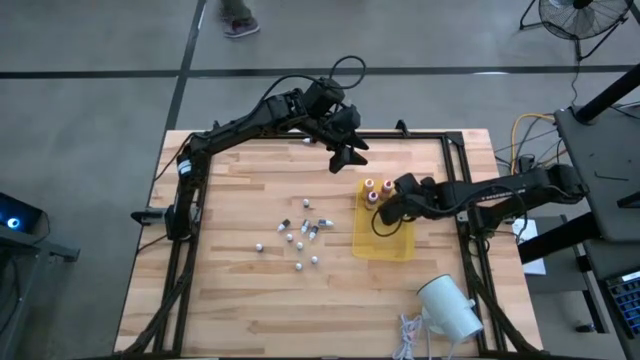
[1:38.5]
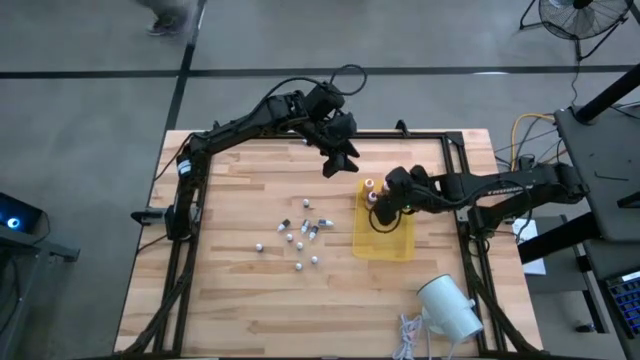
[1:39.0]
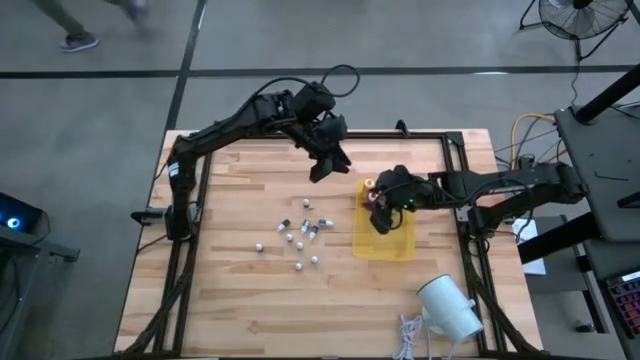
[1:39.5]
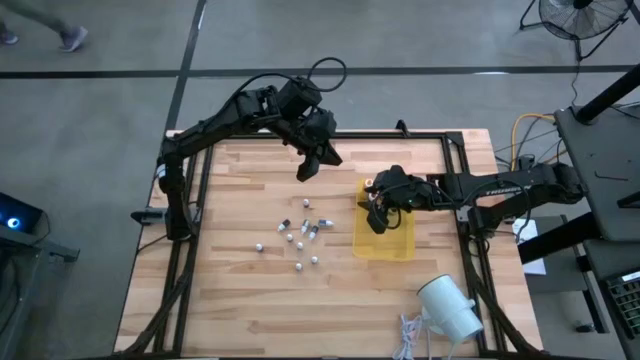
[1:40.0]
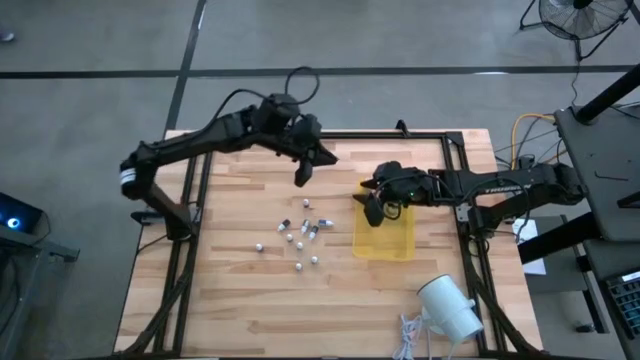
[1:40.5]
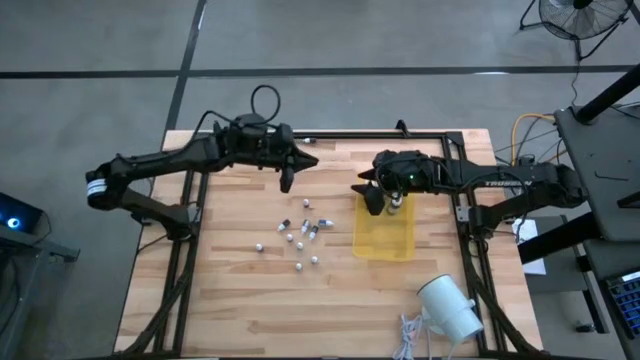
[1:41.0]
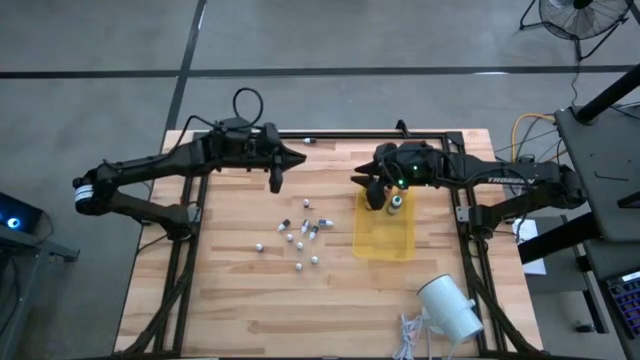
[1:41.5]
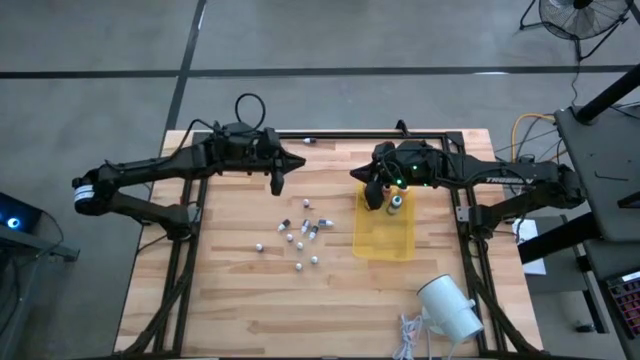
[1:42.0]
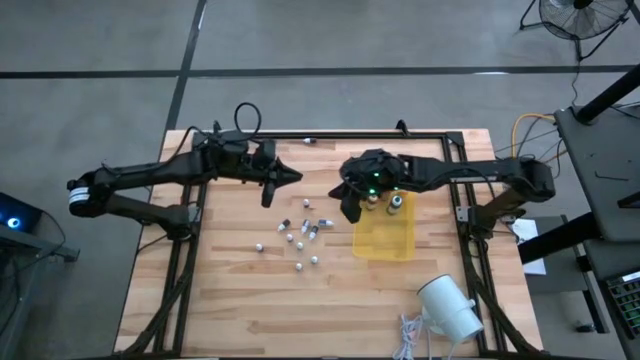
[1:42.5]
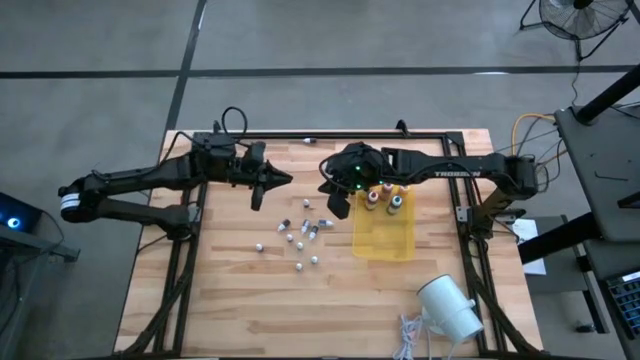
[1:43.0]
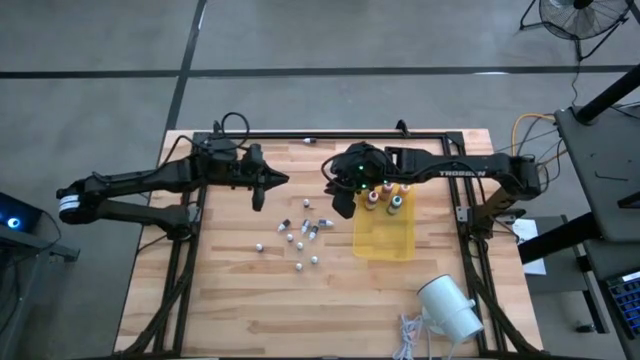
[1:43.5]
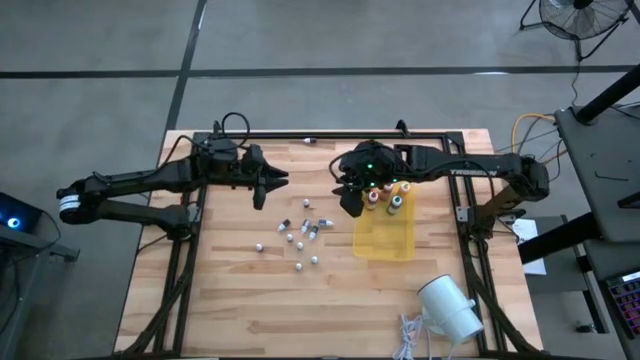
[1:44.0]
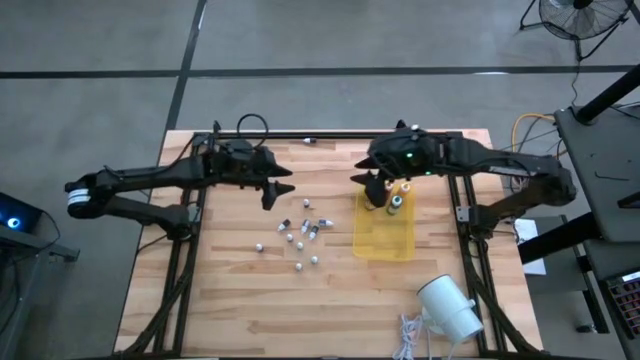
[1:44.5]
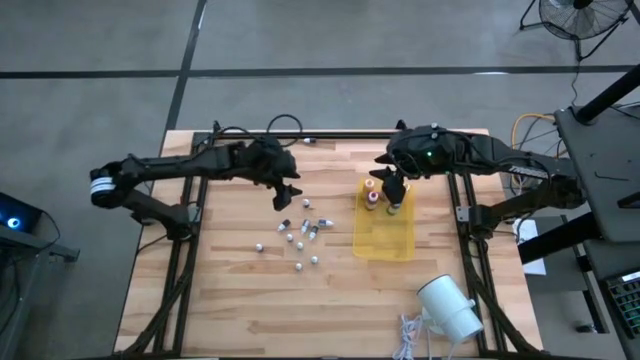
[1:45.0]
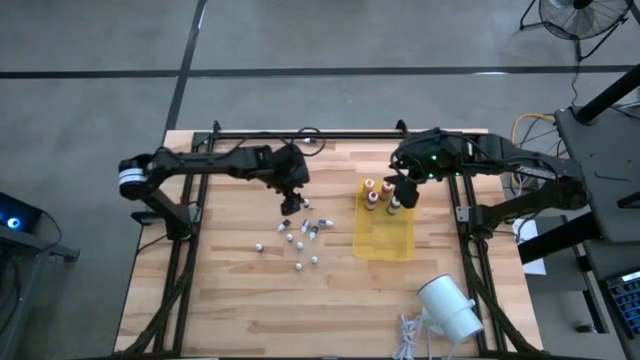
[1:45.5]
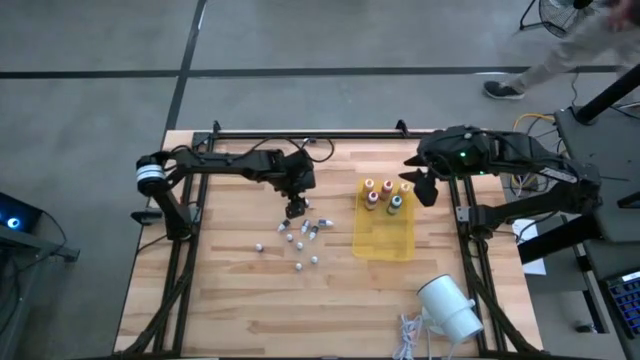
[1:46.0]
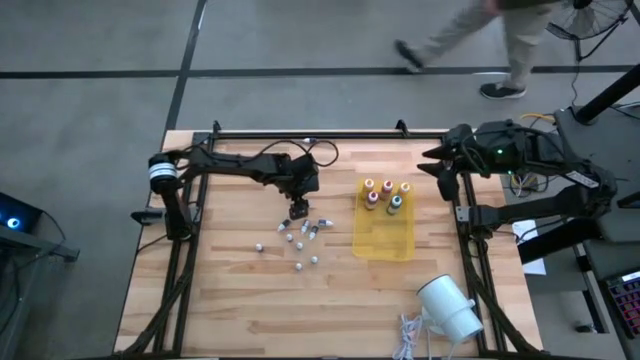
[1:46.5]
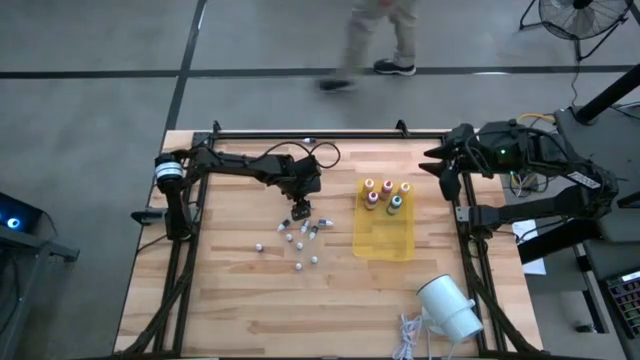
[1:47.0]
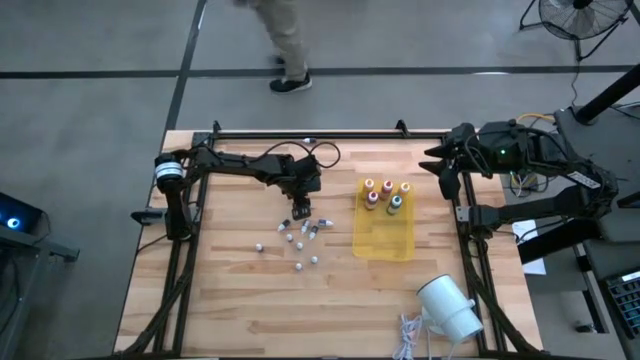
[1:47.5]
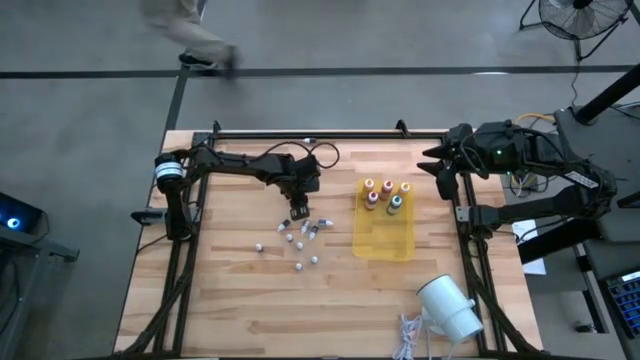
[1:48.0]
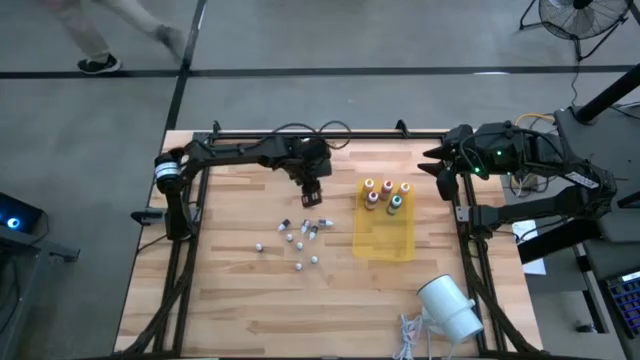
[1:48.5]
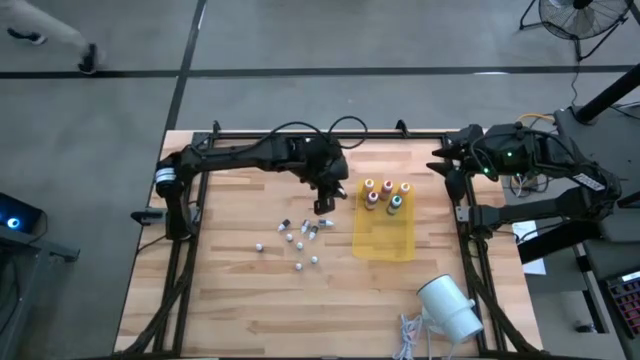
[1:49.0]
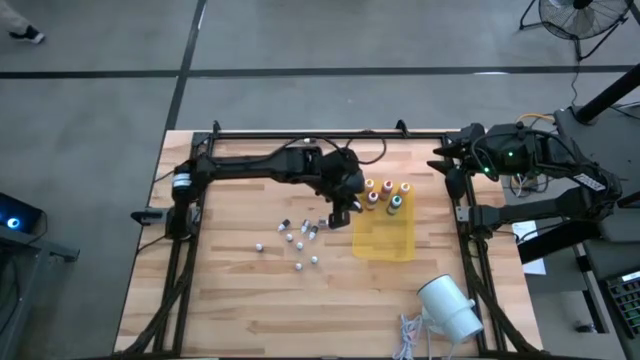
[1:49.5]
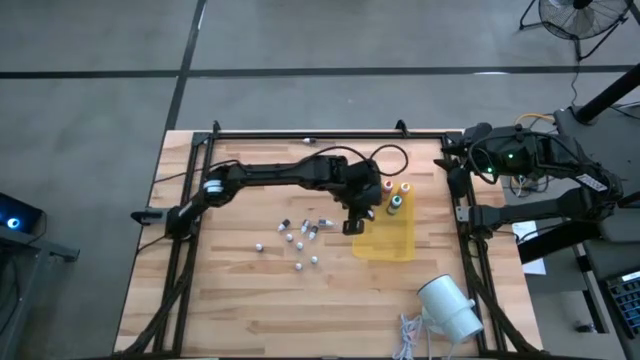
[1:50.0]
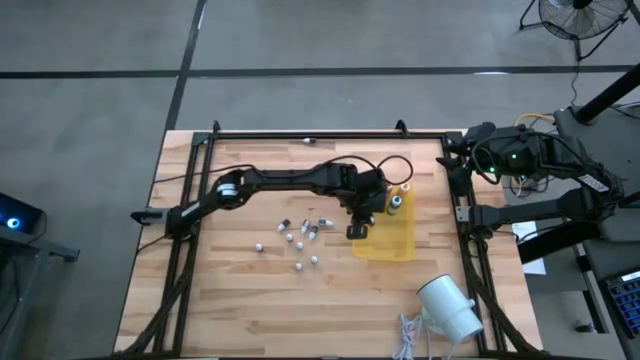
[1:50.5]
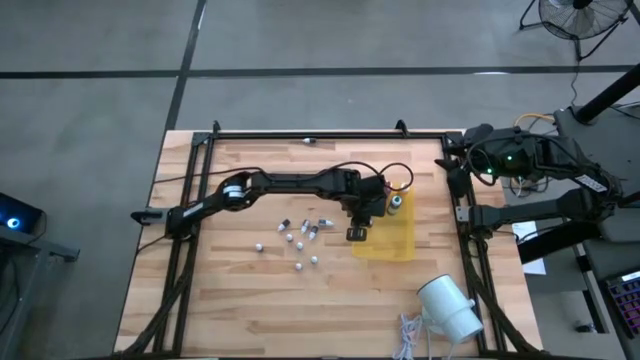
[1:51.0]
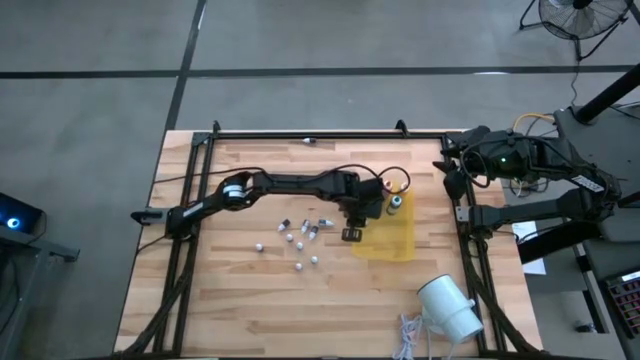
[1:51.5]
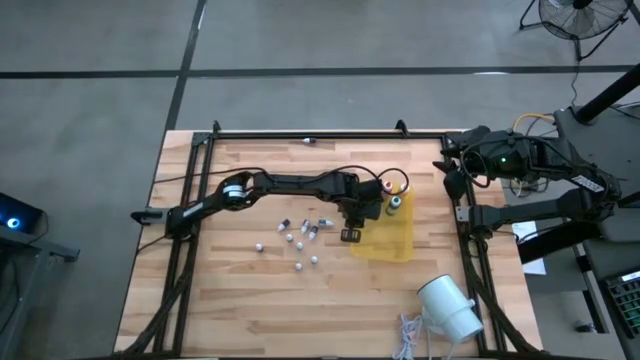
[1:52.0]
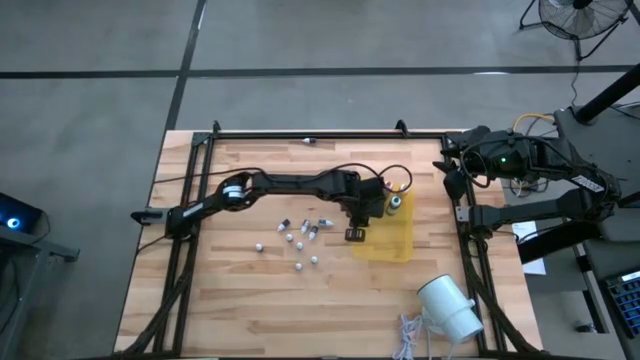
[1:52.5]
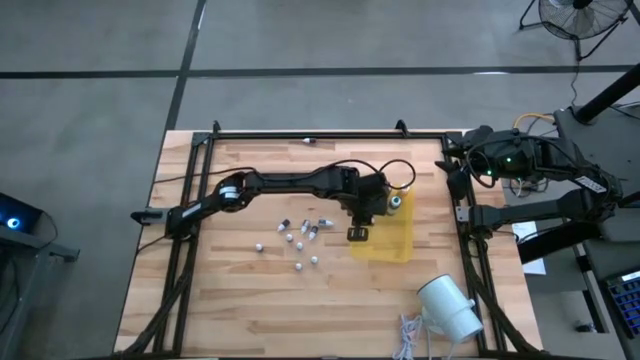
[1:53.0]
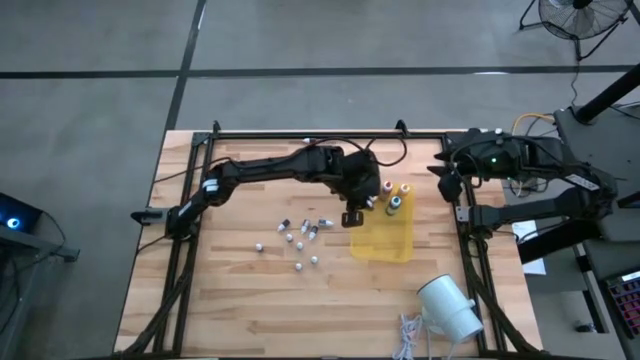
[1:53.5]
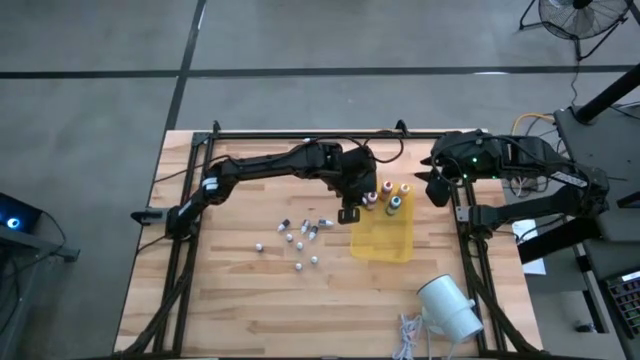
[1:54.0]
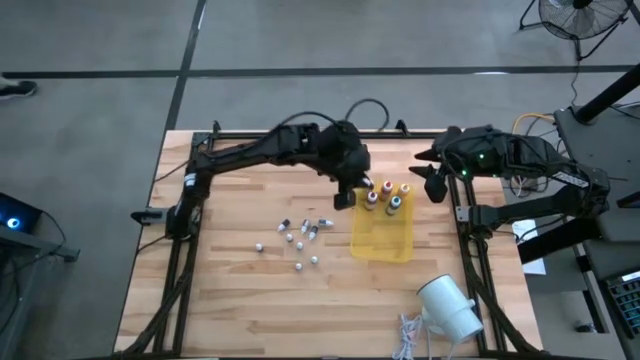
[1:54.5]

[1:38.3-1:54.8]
Task: Pick & Place food coloring
Put the top small red food coloring bottle into the yellow bin
